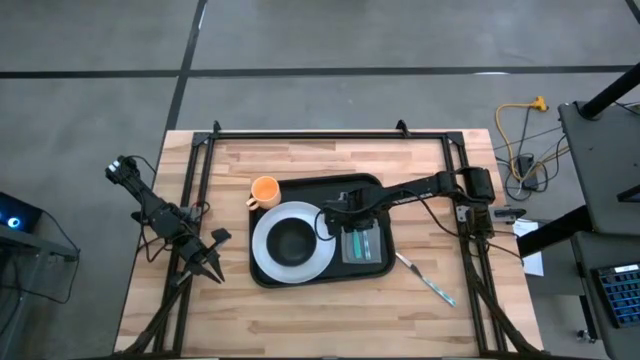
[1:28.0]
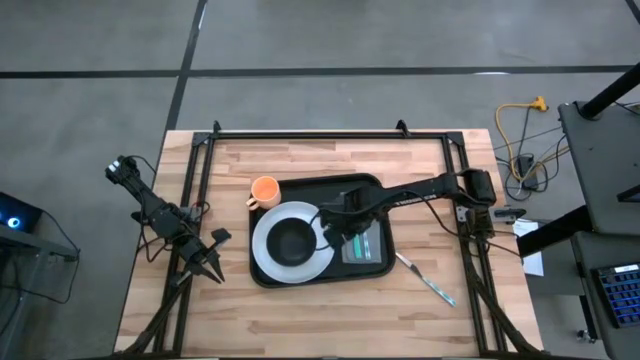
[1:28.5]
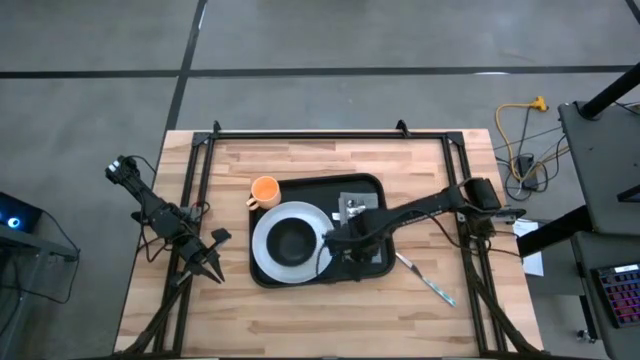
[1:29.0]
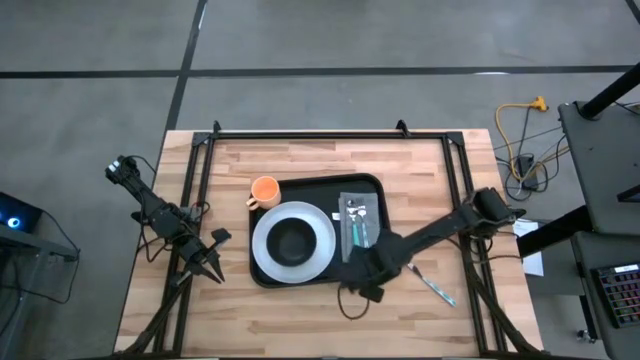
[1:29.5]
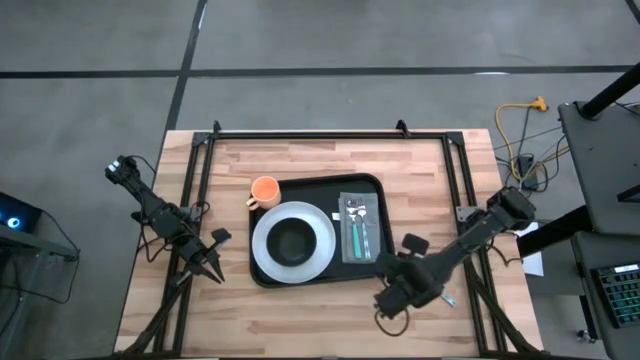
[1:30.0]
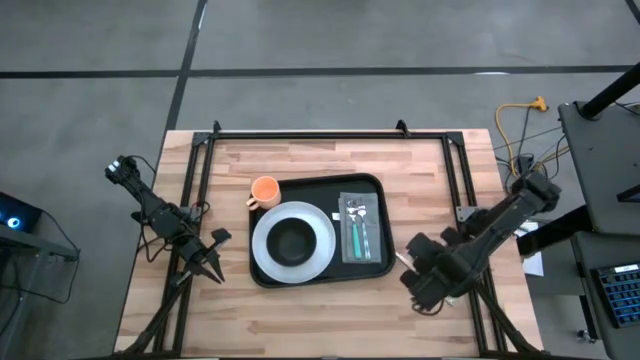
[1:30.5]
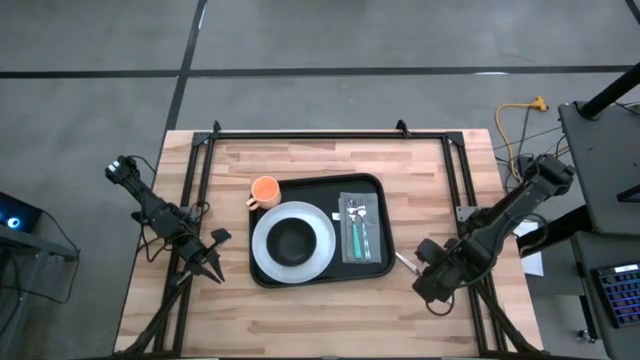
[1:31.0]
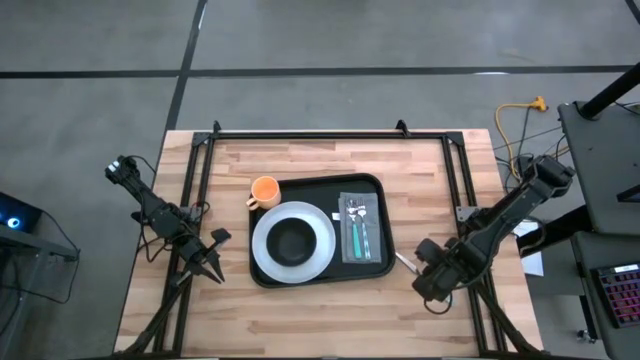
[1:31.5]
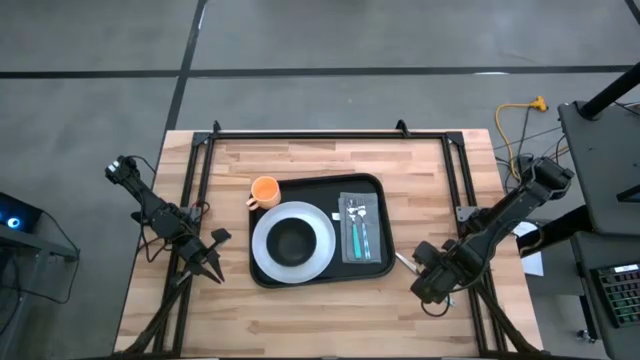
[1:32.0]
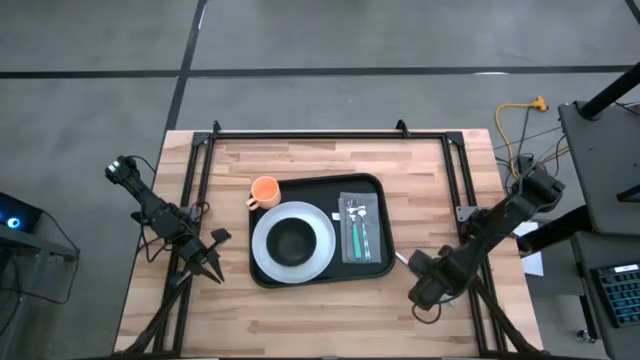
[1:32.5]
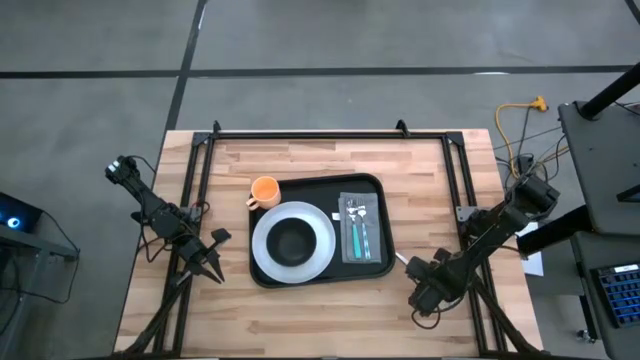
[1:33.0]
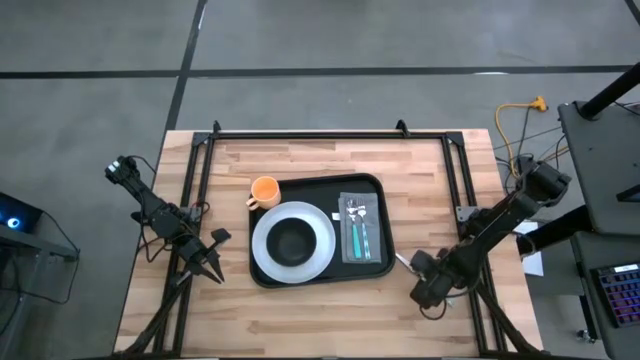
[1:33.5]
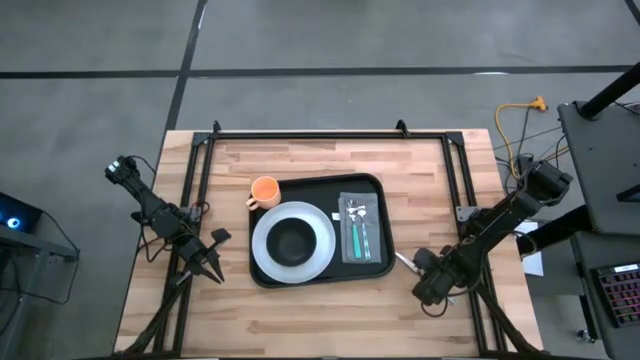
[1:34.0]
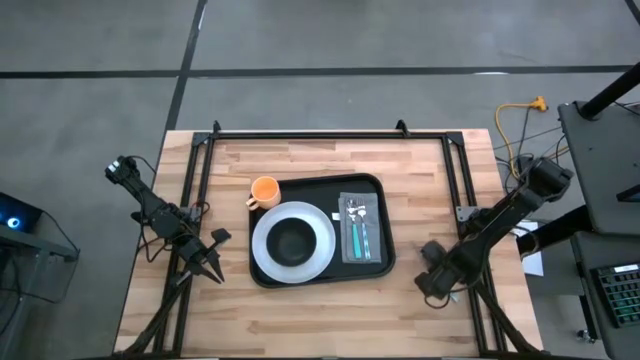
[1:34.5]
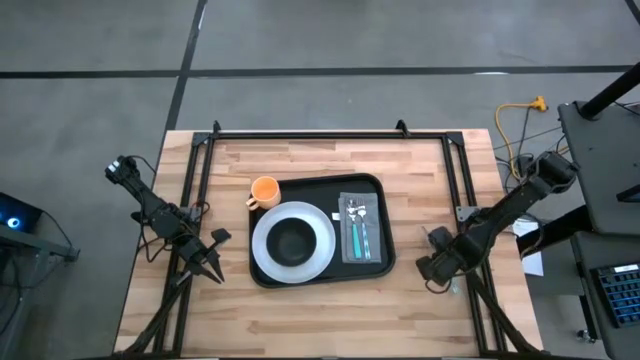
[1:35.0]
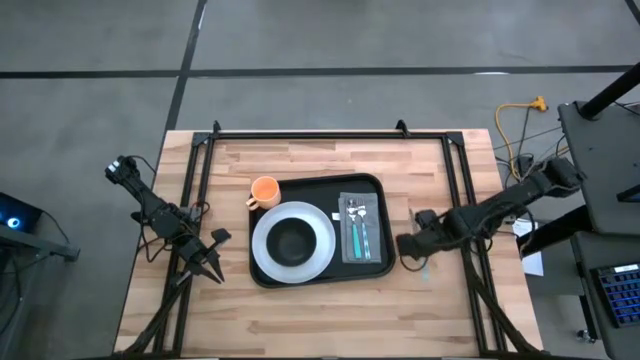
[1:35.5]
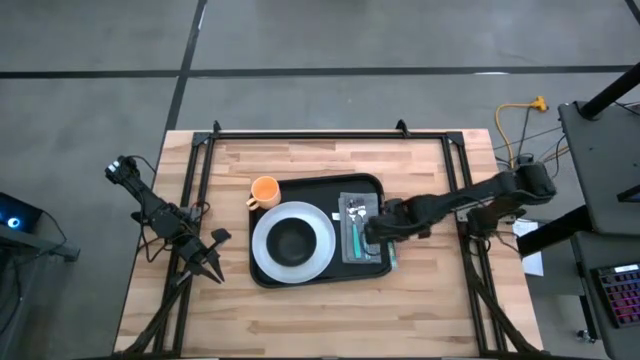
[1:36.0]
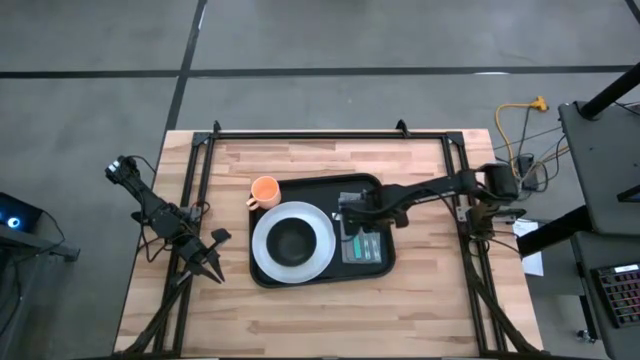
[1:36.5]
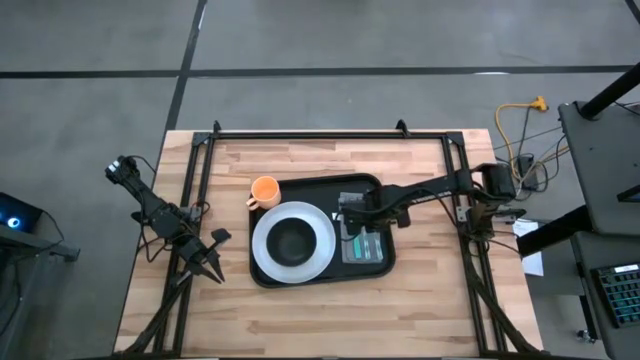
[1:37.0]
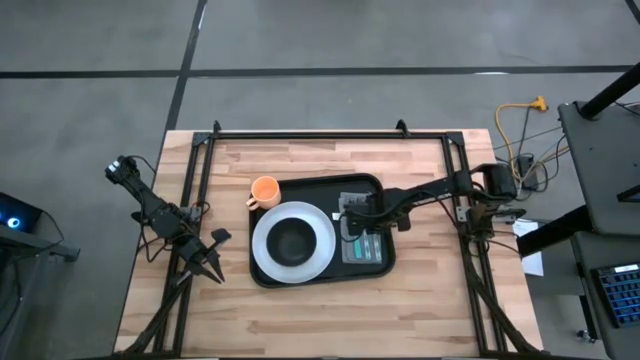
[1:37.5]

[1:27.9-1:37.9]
Task: Set up tray
Put the blue knife on the gray napkin to the right of the blue fork

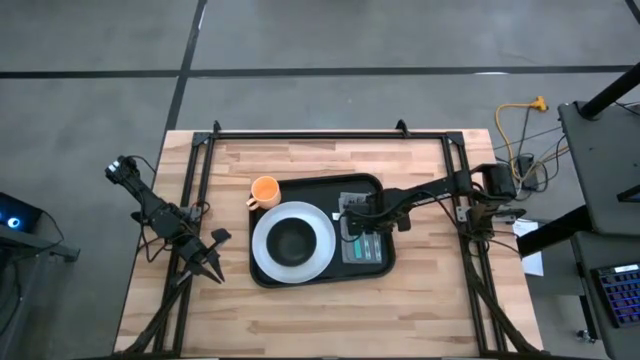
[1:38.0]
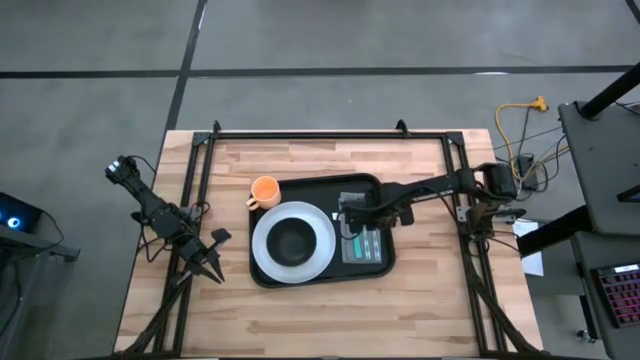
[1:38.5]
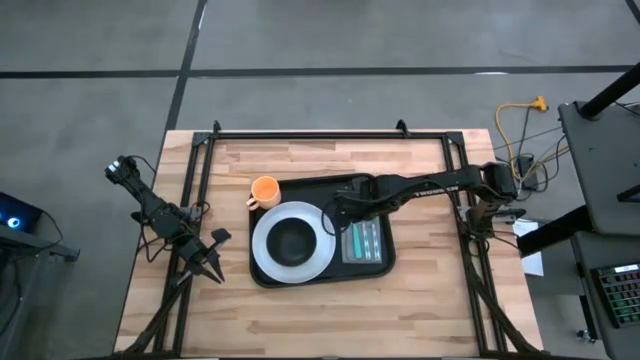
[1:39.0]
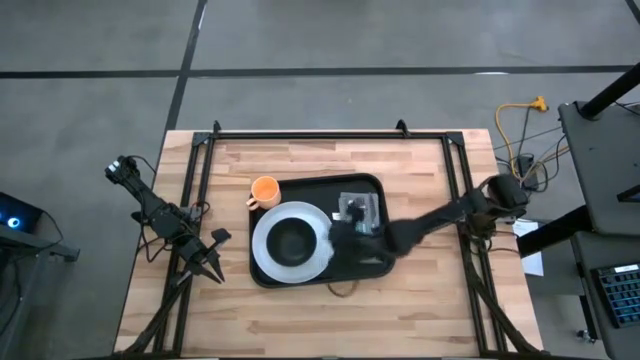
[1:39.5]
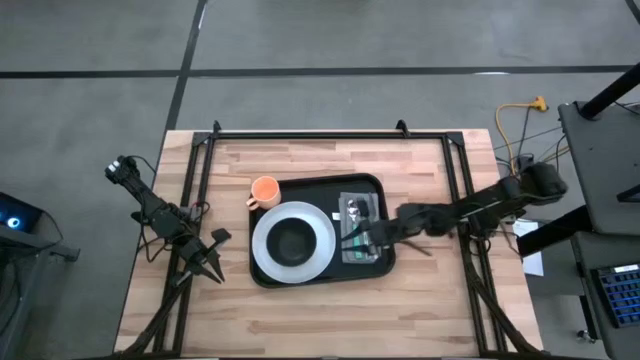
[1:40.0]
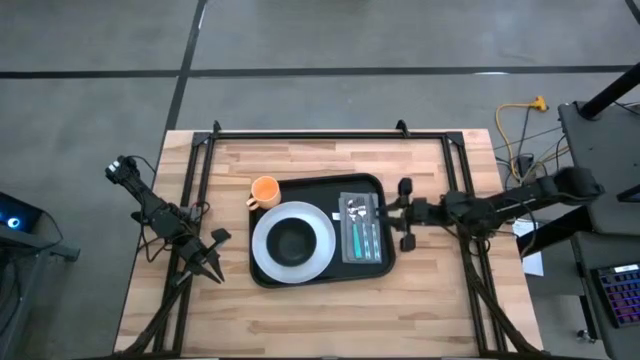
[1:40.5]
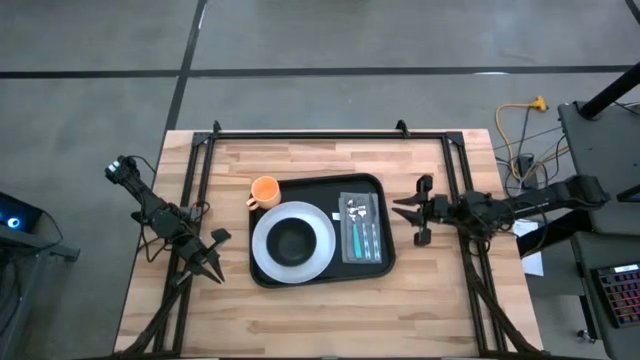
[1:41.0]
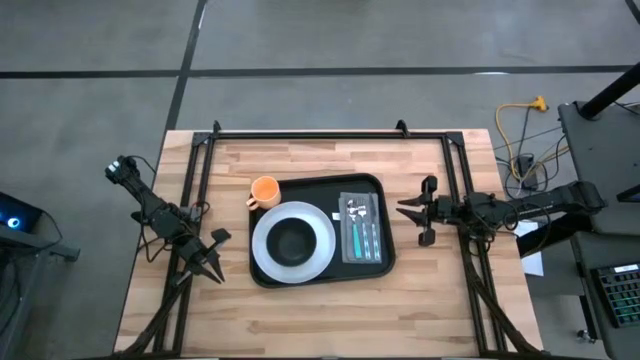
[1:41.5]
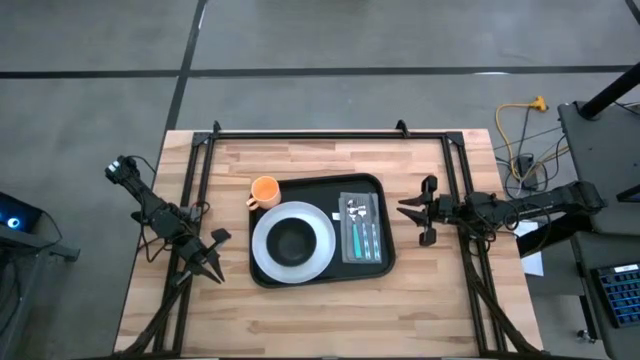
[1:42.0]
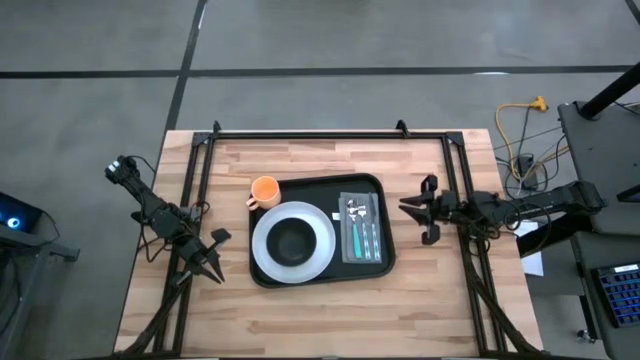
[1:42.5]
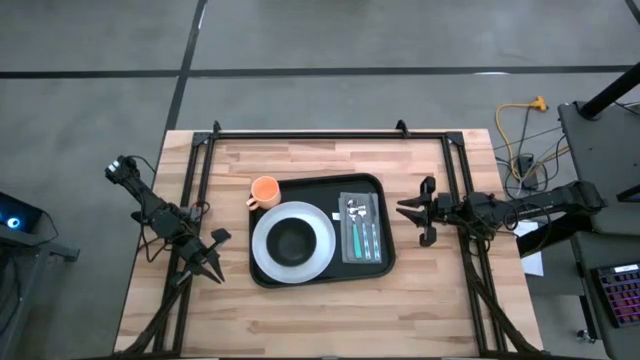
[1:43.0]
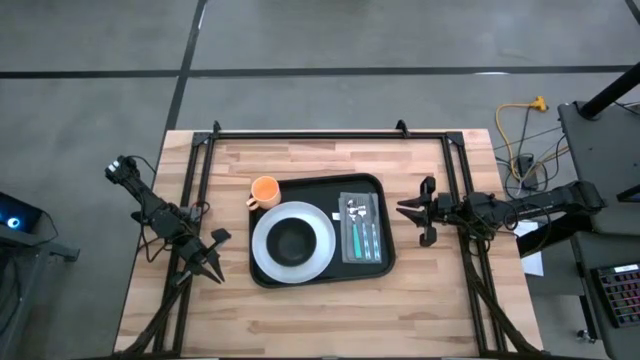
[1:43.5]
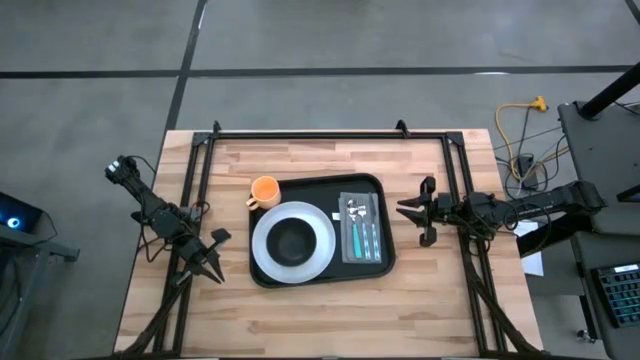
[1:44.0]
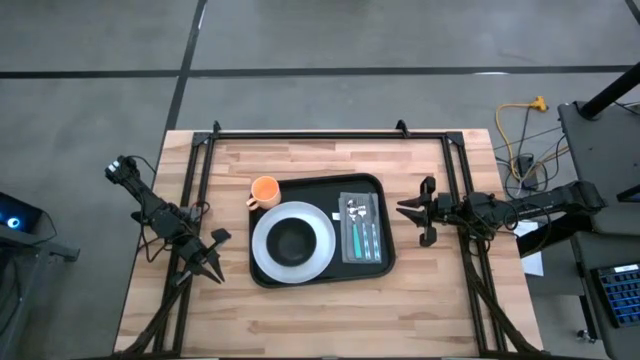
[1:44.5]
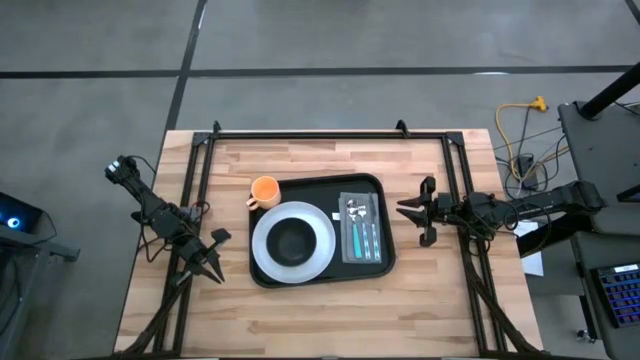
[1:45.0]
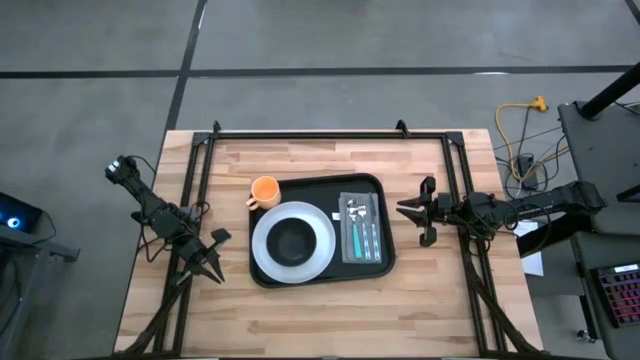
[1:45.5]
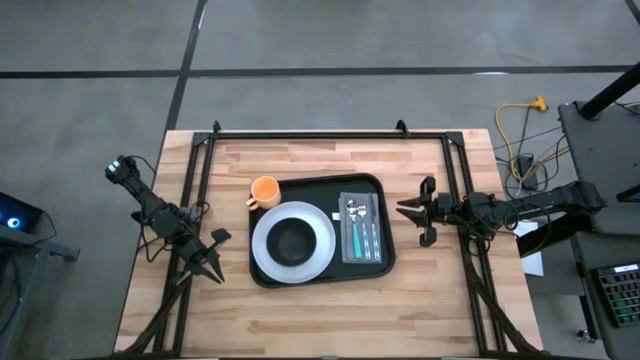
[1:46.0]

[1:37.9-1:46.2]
Return to Home Position

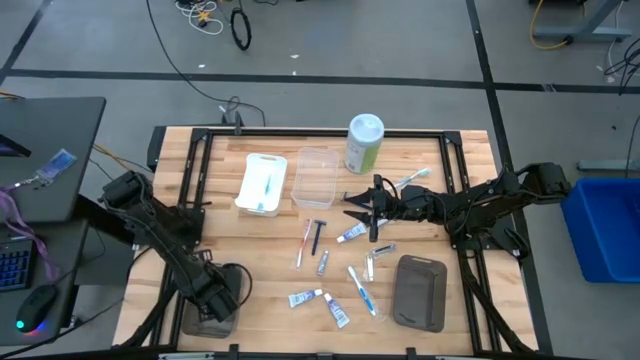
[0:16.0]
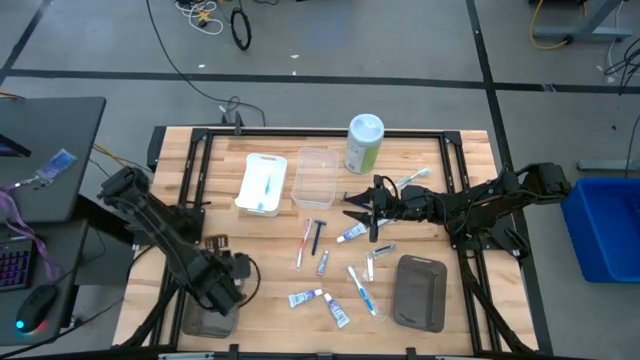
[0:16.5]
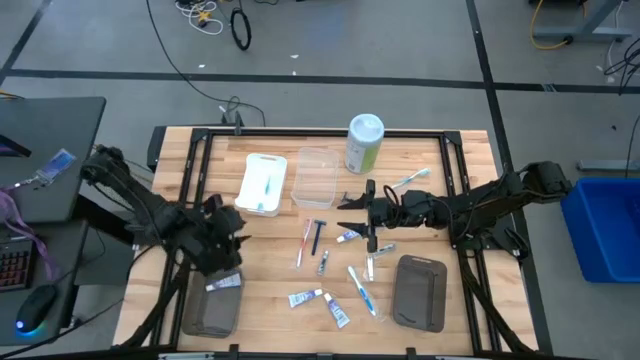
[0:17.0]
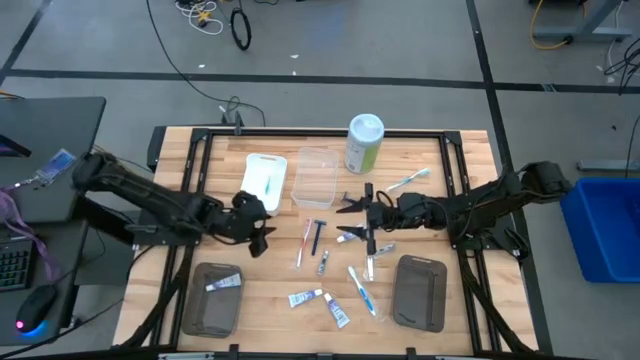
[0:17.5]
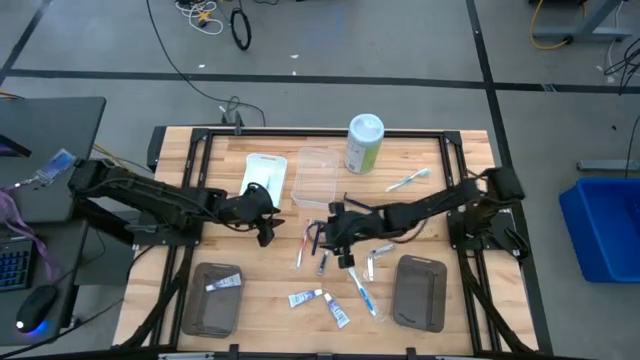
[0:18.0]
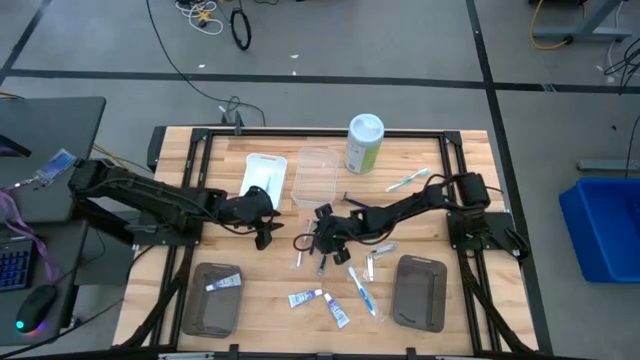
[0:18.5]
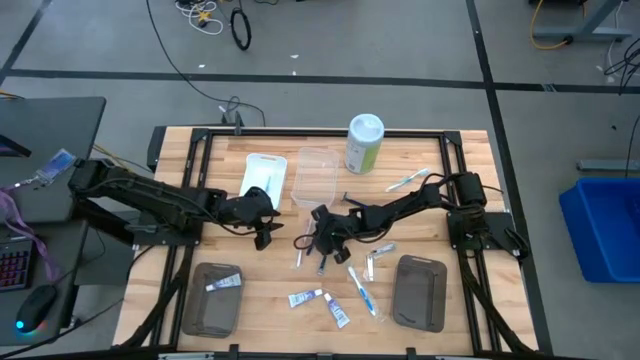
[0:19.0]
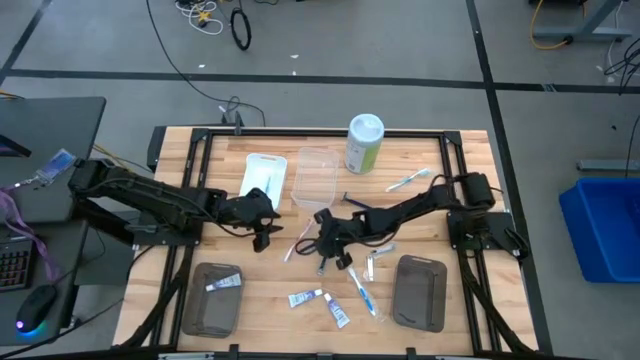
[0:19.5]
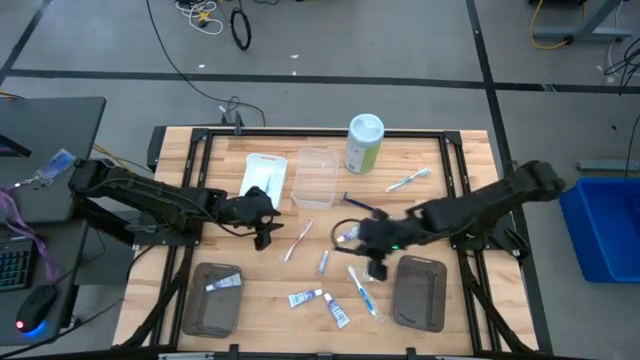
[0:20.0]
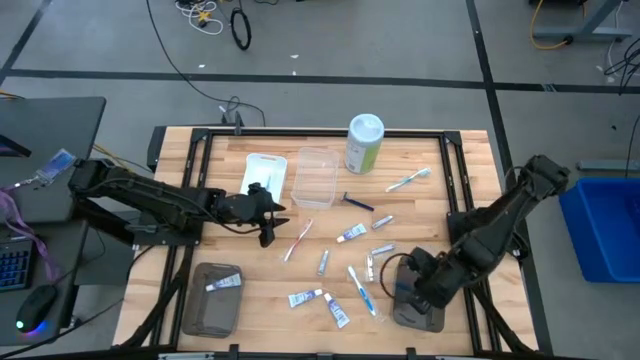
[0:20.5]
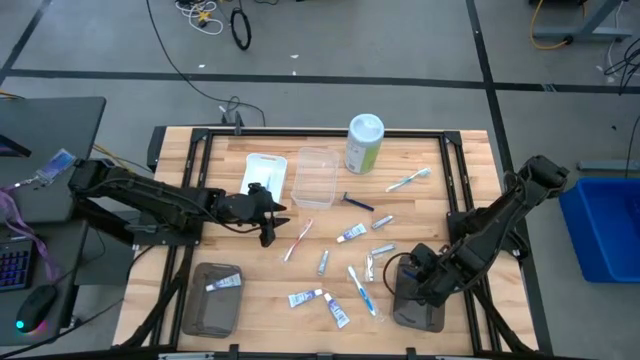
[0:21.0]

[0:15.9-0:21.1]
Task: Pick & Place Travel size toiletries
Put the bottom blue razor into the right black bin
